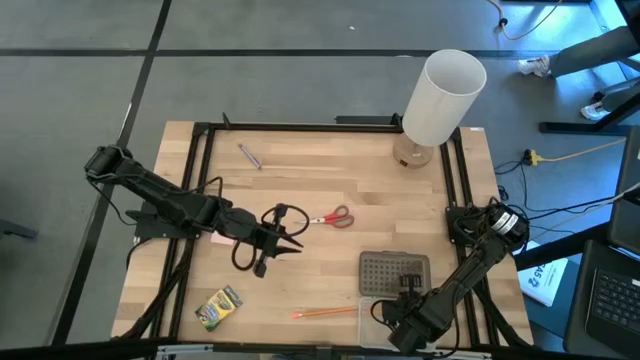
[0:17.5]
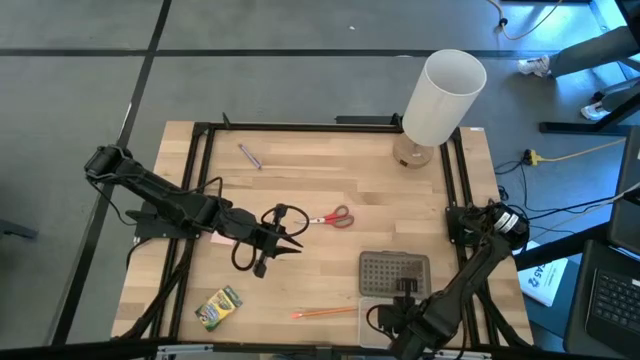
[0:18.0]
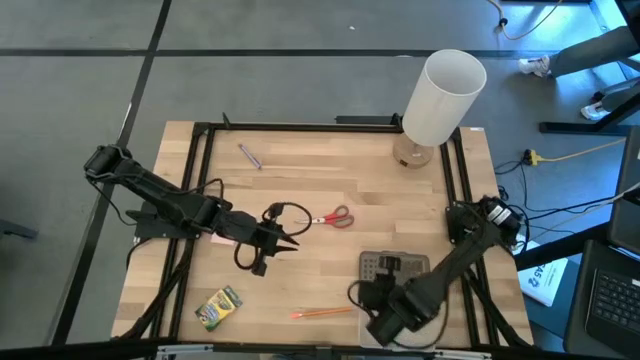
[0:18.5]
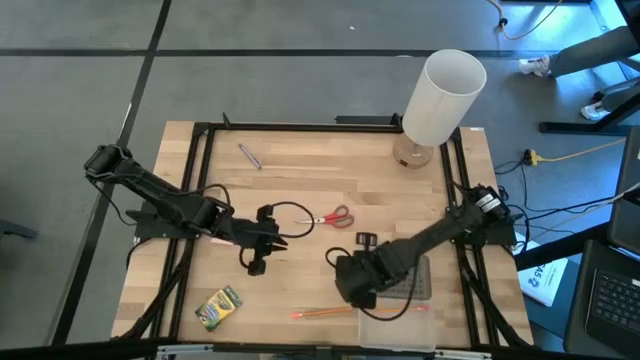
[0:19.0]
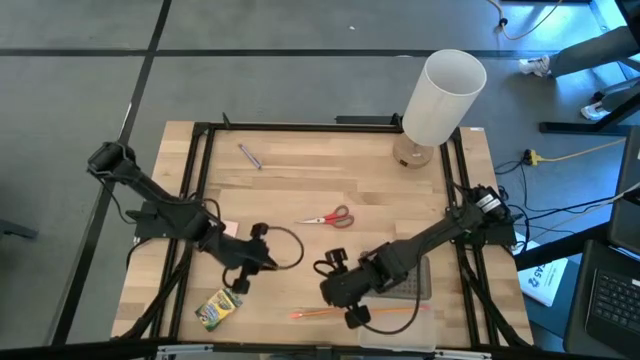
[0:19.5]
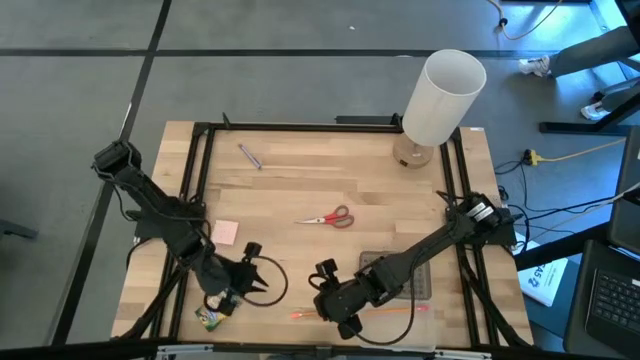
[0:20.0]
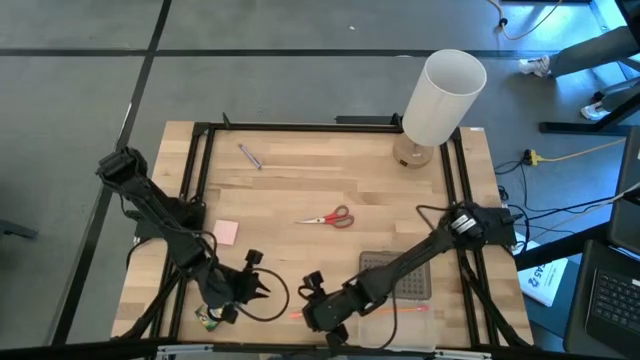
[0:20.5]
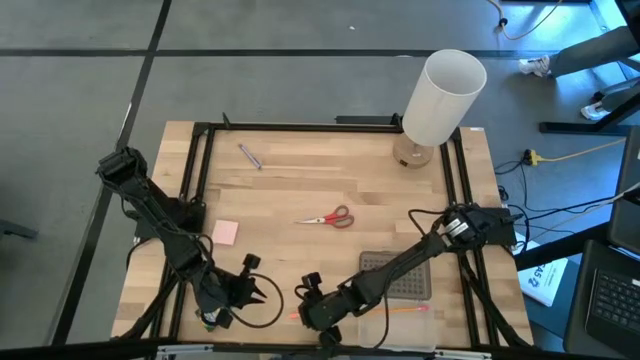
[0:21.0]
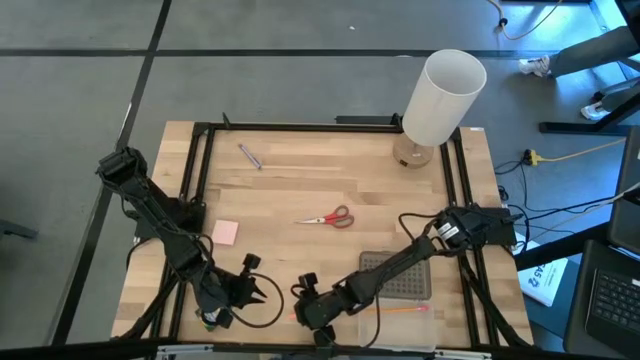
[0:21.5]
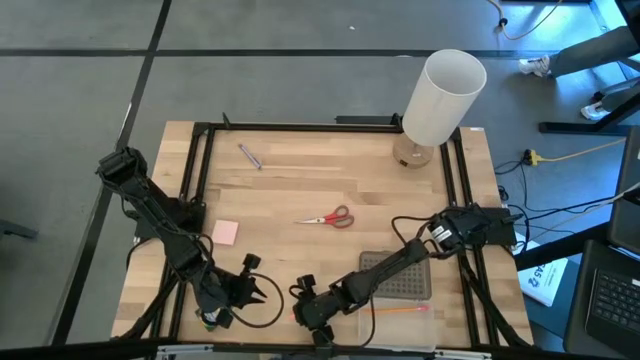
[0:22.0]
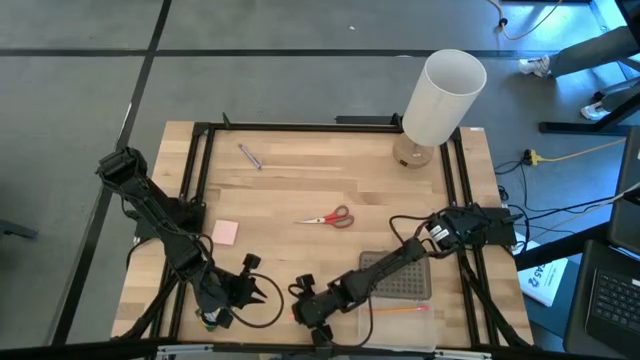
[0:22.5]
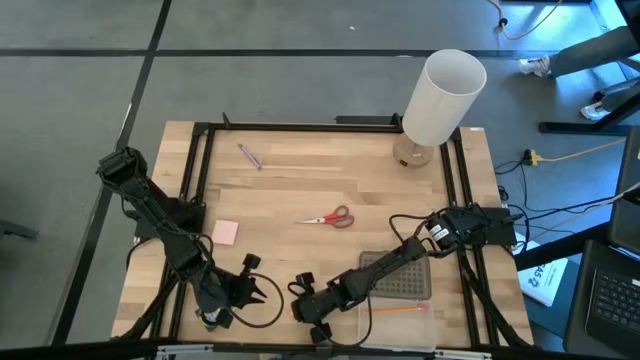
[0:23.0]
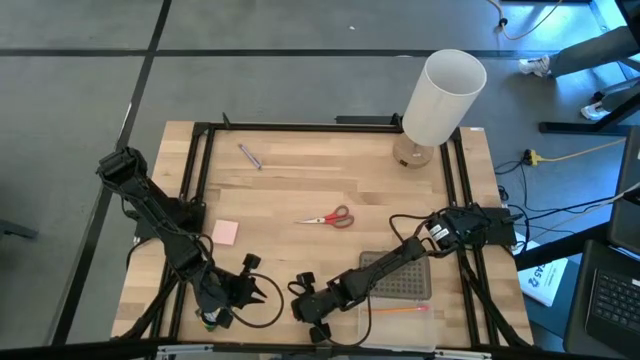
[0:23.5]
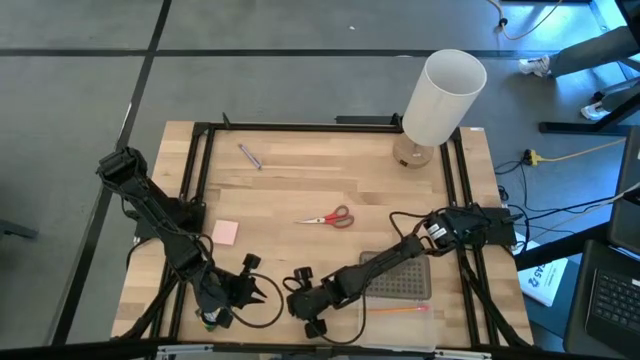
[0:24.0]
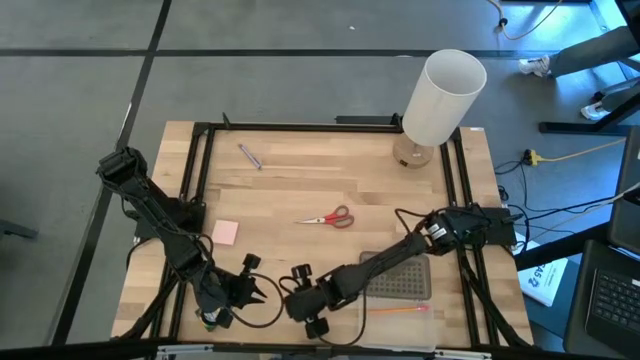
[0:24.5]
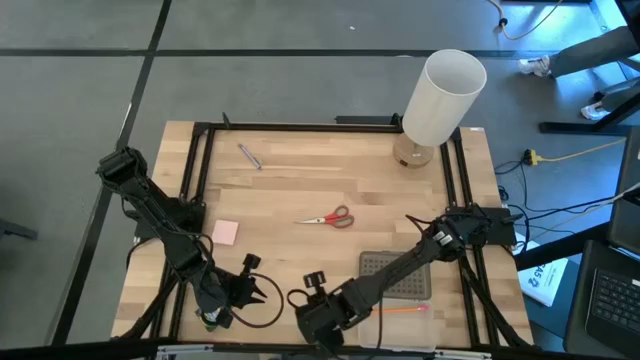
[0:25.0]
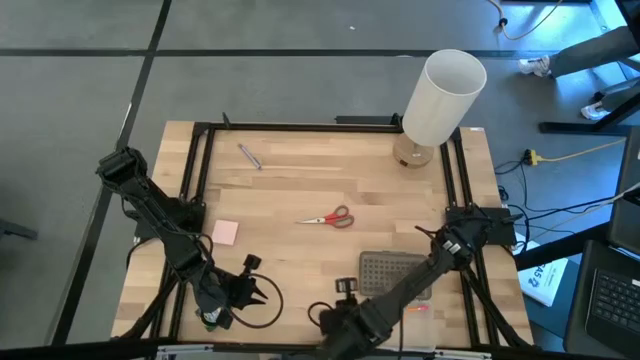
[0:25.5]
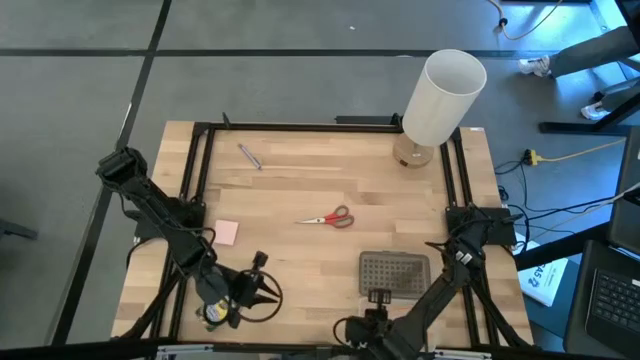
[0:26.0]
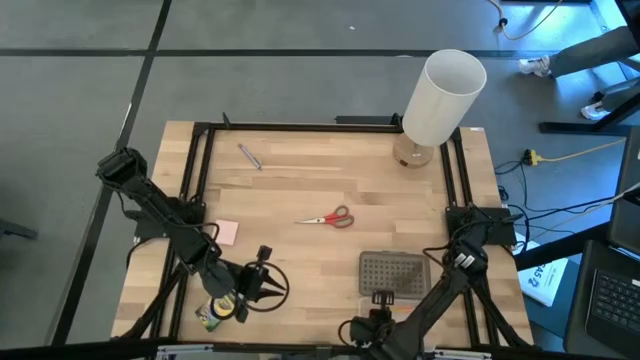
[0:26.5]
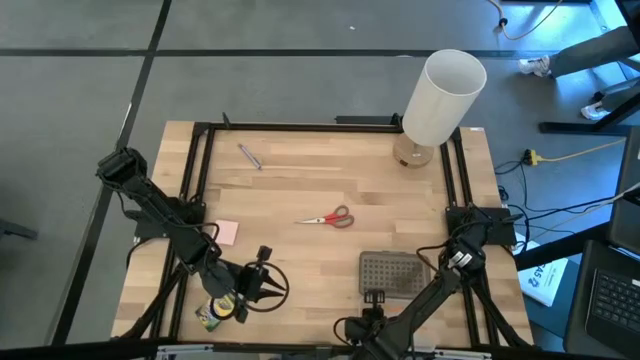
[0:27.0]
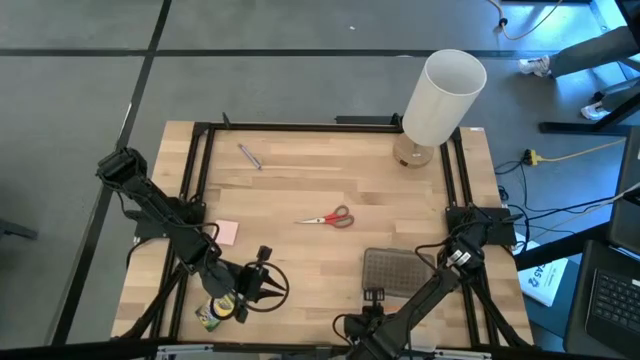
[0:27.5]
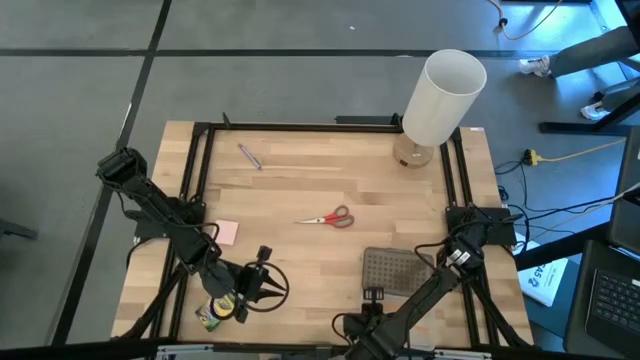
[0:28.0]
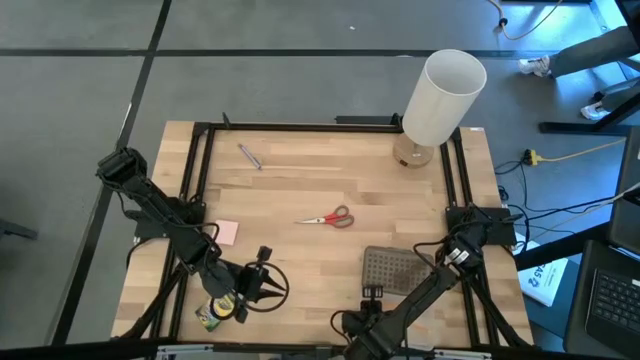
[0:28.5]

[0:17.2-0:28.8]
Task: Pack school essentials
Put the orange pencil into the supply box

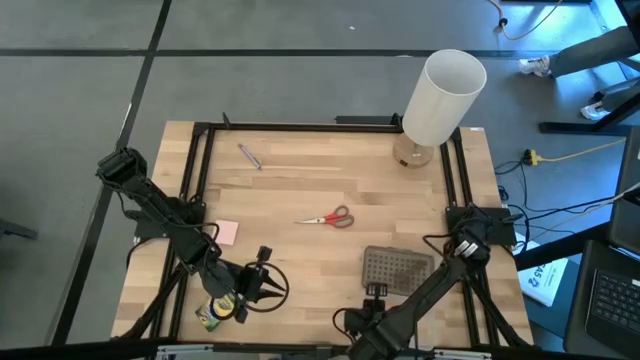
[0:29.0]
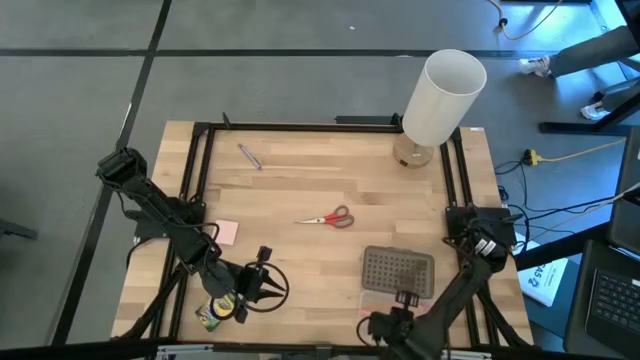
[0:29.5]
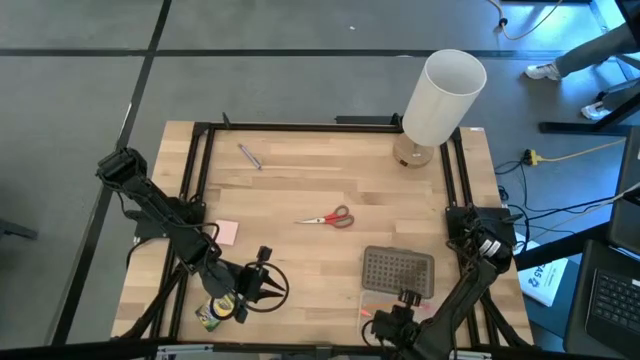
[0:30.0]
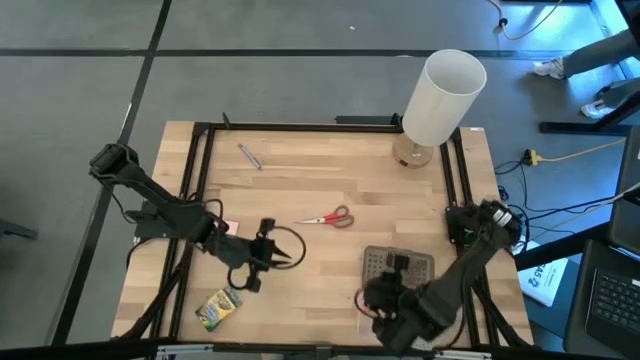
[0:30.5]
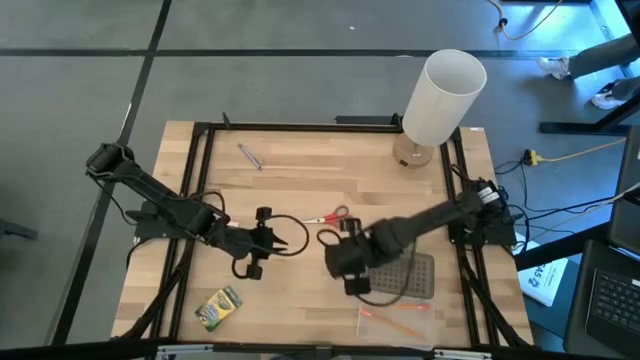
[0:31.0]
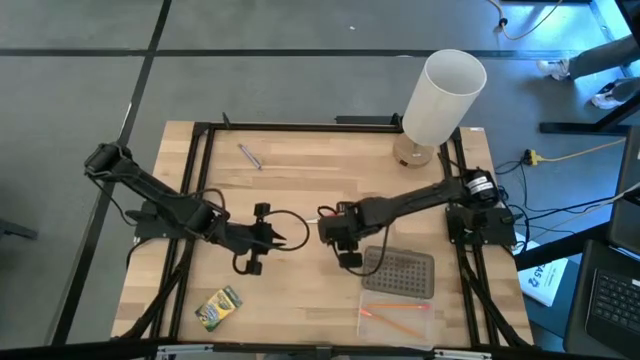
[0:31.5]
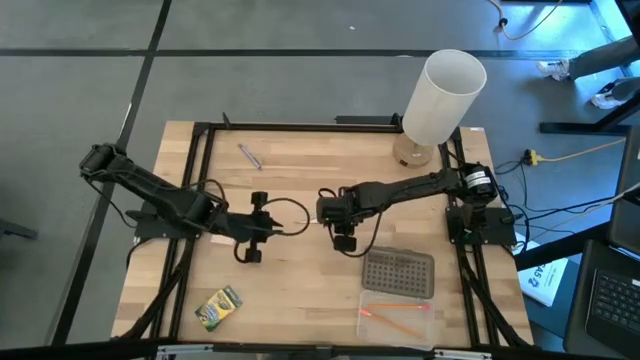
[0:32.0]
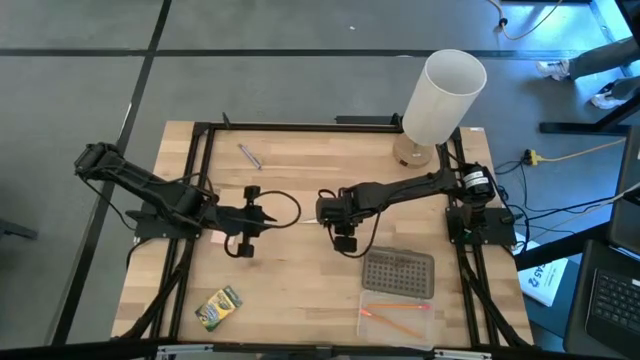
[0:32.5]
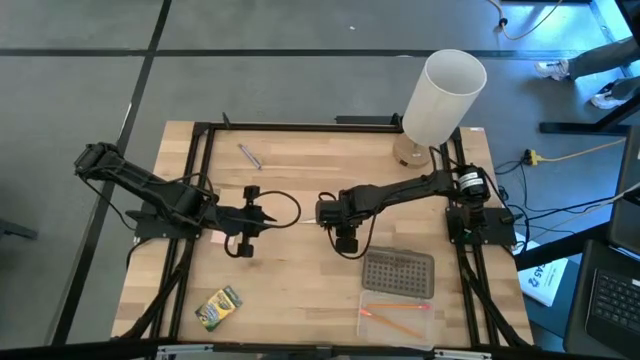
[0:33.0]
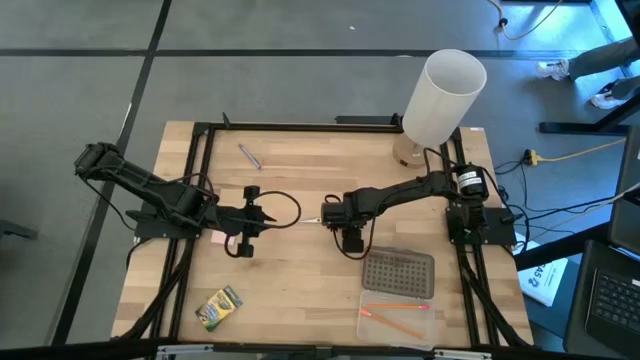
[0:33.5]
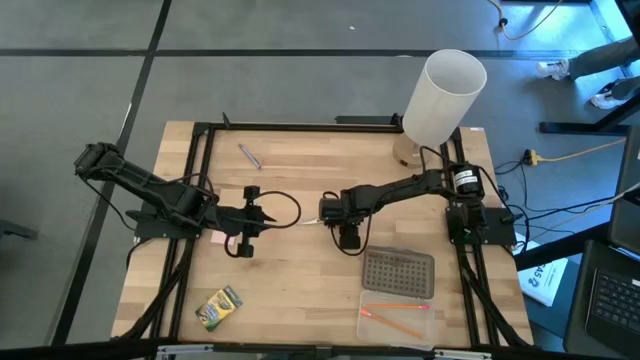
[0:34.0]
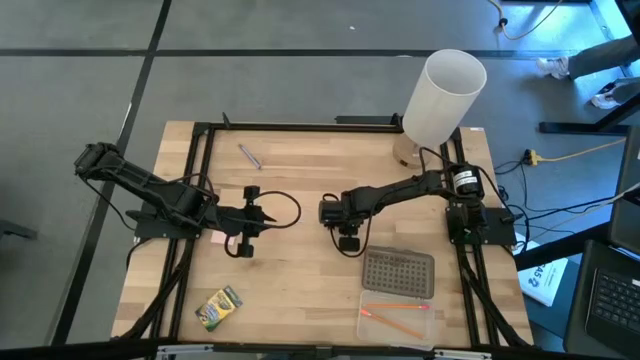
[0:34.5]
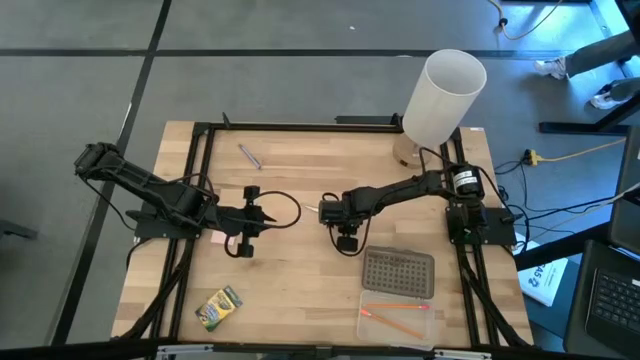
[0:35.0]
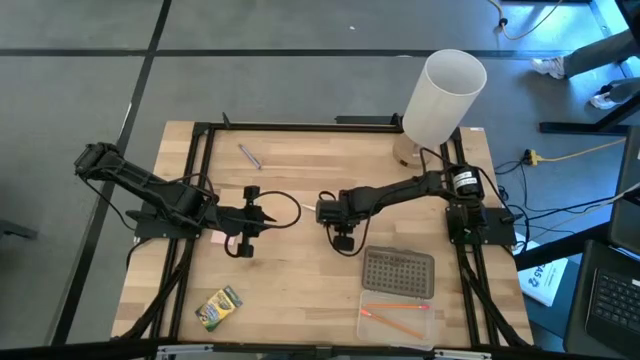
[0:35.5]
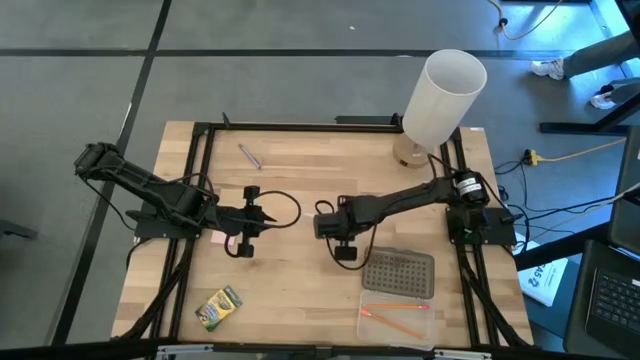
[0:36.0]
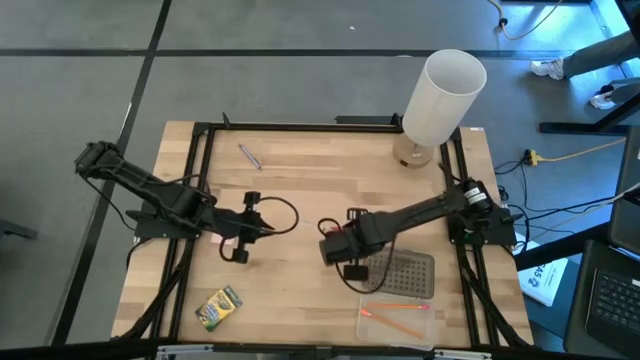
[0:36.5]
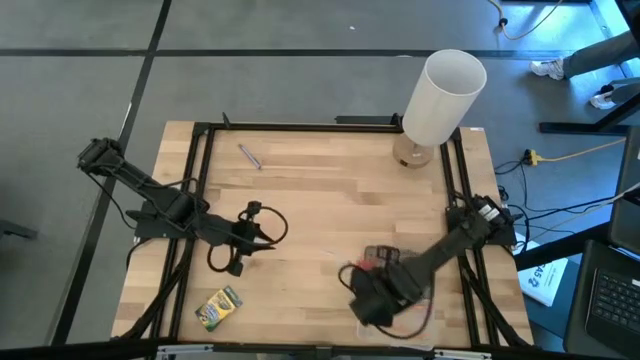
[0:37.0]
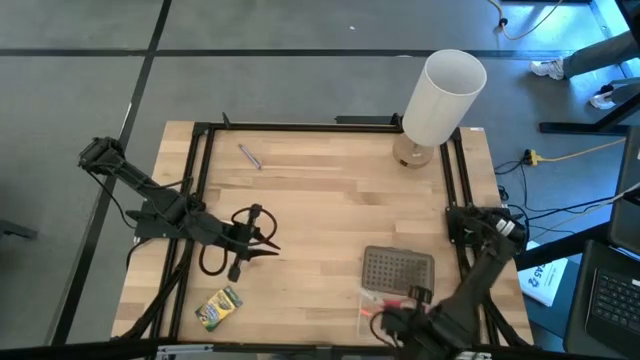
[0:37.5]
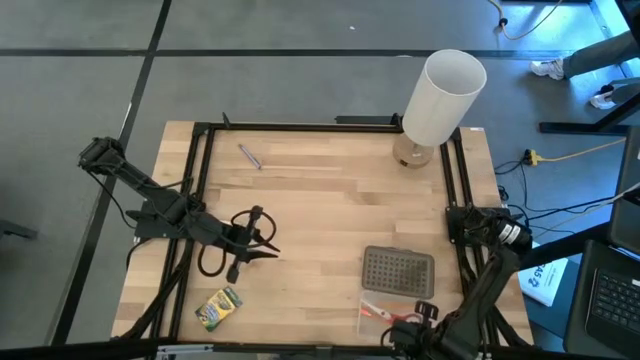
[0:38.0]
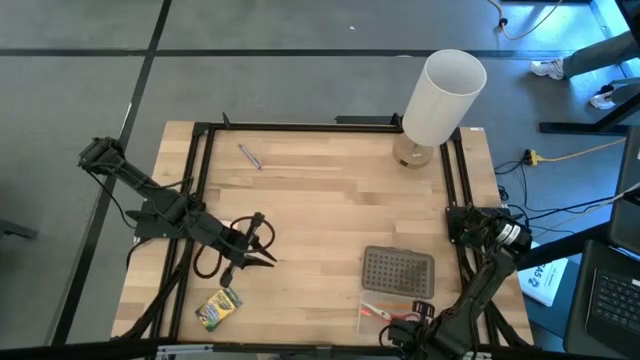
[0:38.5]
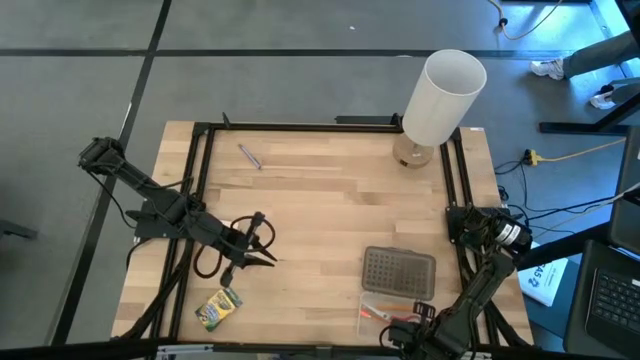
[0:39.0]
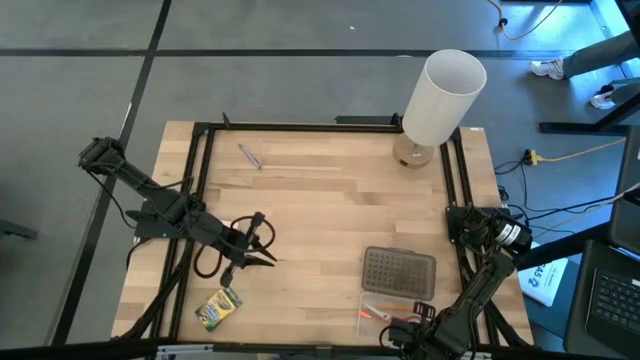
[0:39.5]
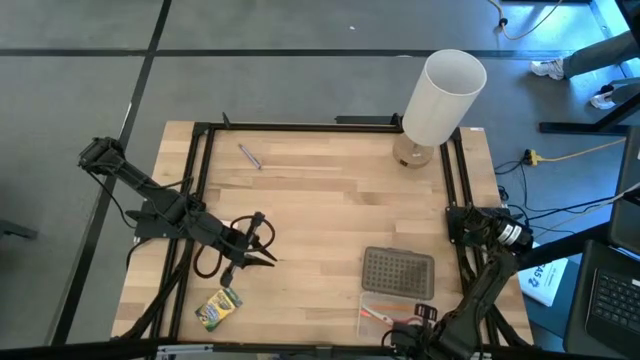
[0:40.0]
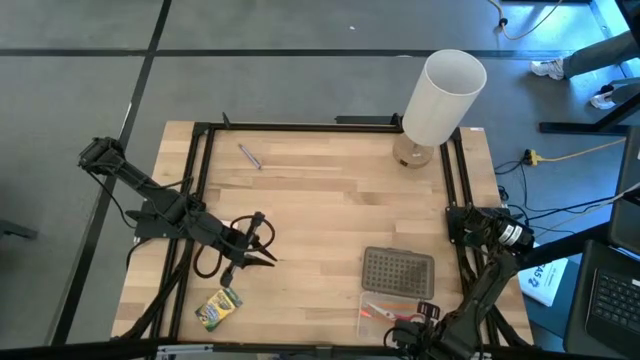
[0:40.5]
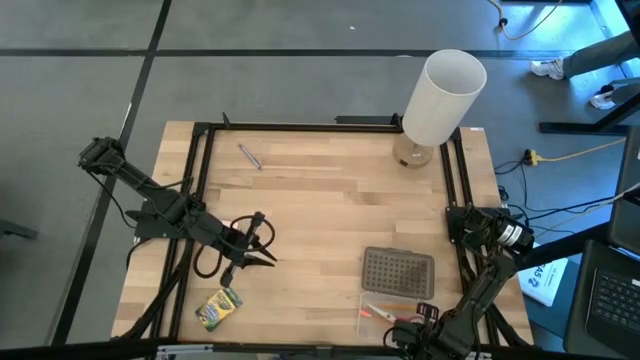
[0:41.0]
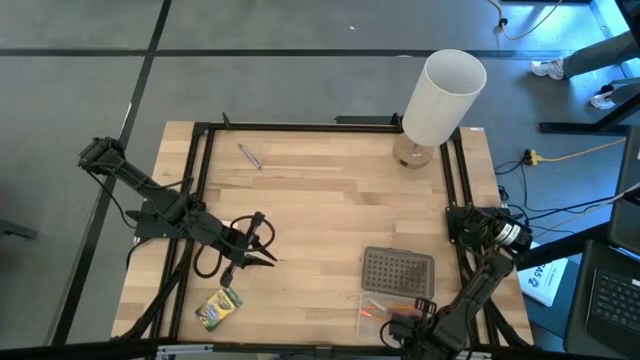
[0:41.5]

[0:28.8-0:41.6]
Put the red scissor into the supply box
